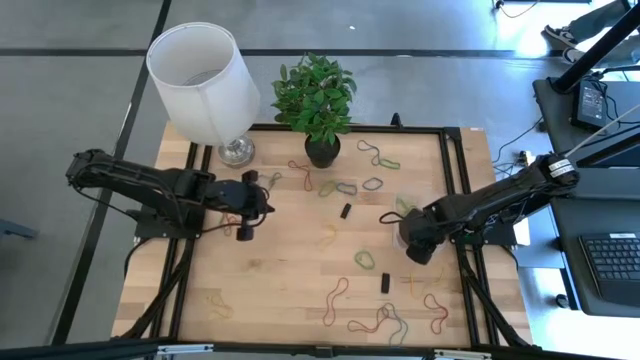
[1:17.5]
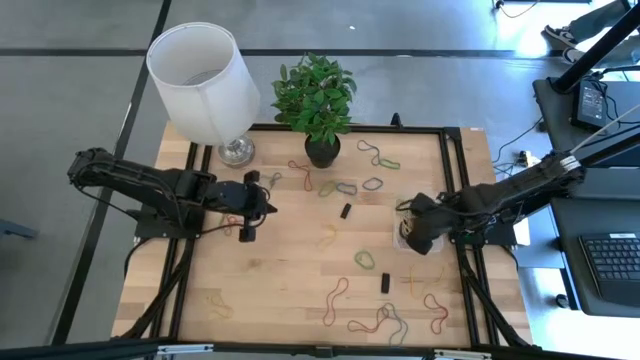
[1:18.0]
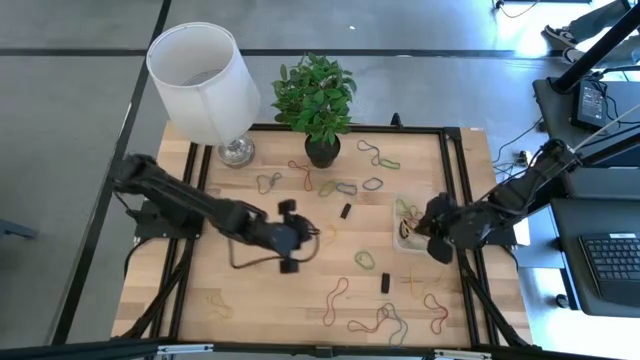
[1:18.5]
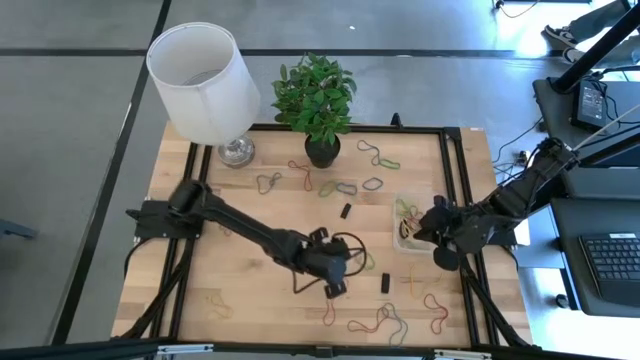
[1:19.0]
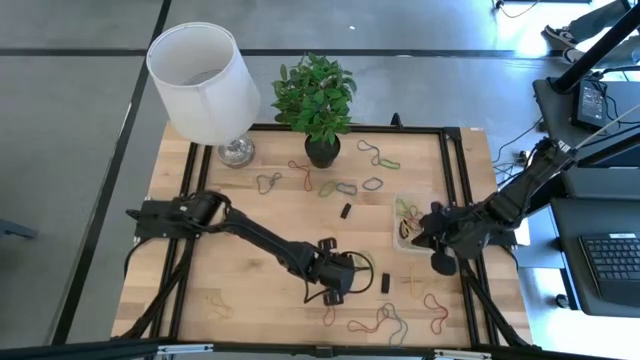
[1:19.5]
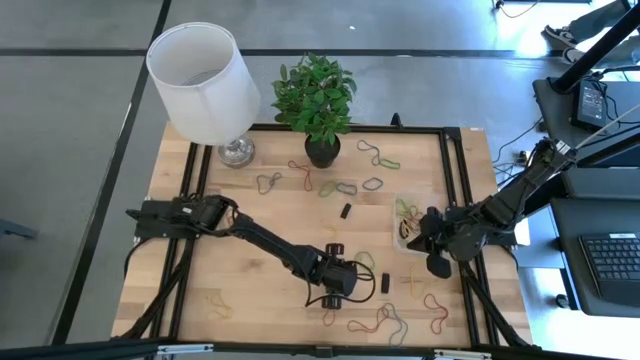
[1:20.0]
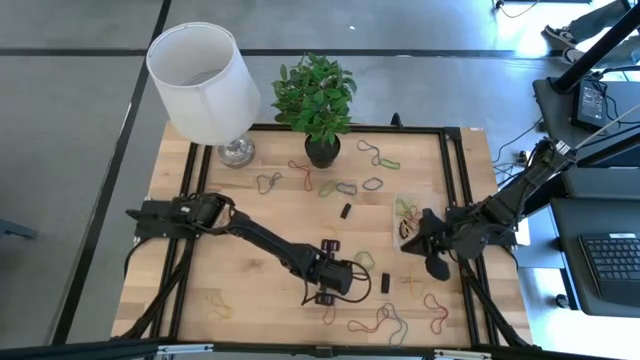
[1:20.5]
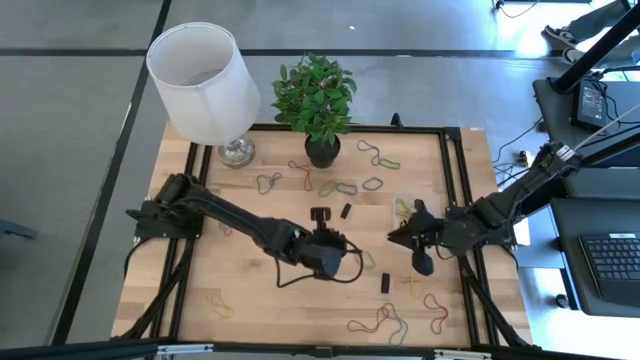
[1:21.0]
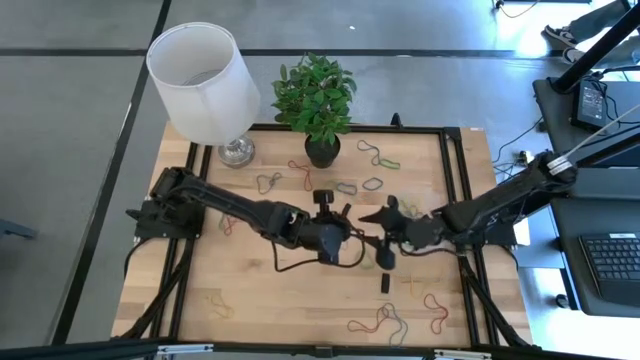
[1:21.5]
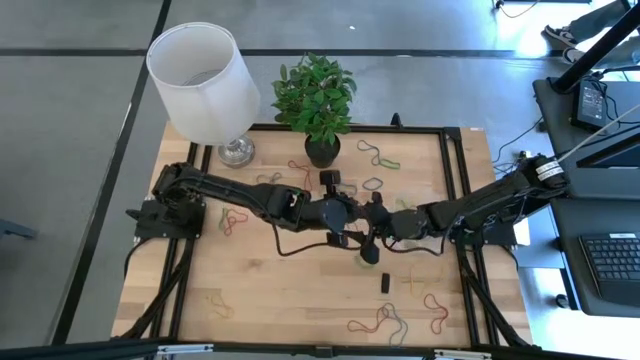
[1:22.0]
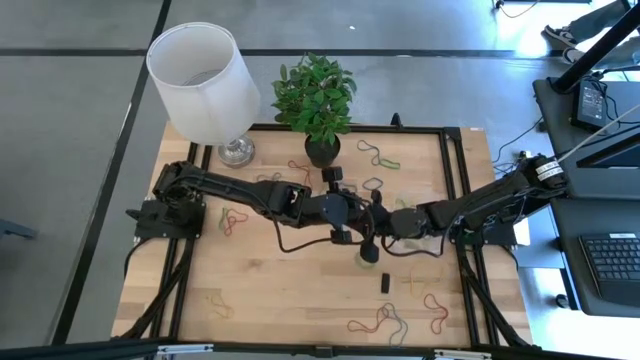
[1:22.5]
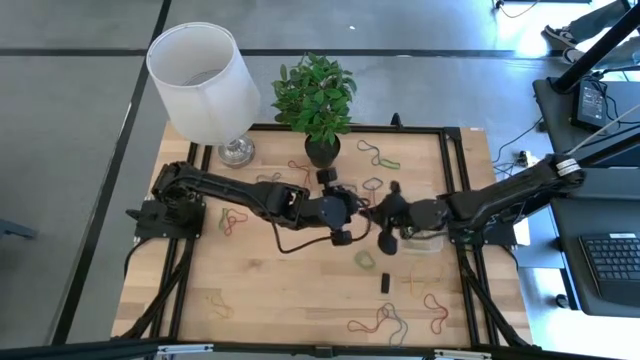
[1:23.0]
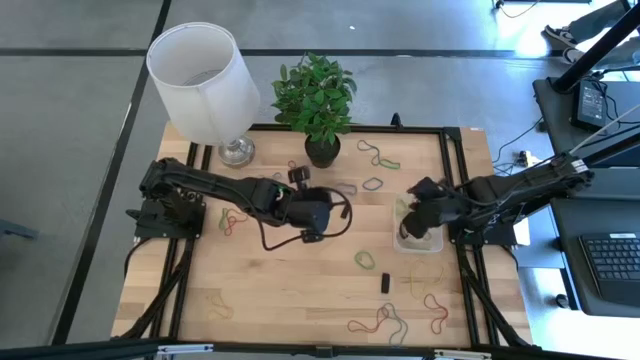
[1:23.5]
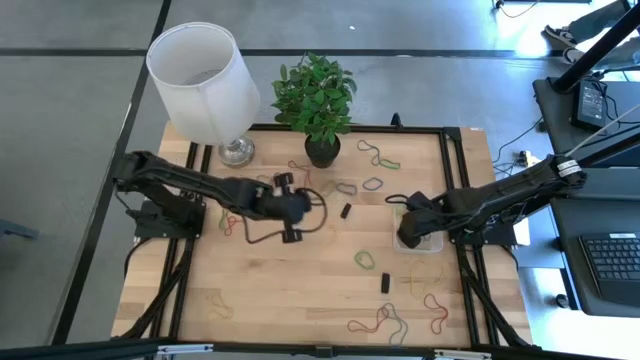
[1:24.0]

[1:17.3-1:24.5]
Task: Pick and place rubber bands into bin
Put the red rubber band into the transparent bin

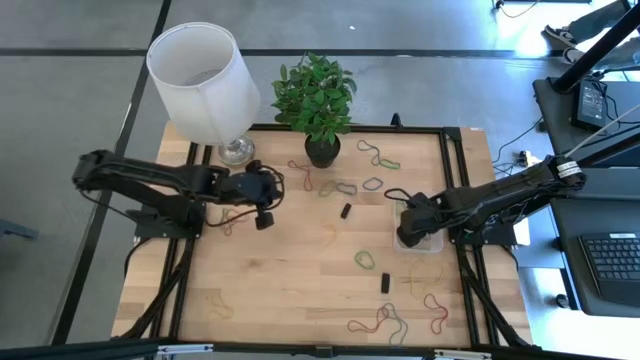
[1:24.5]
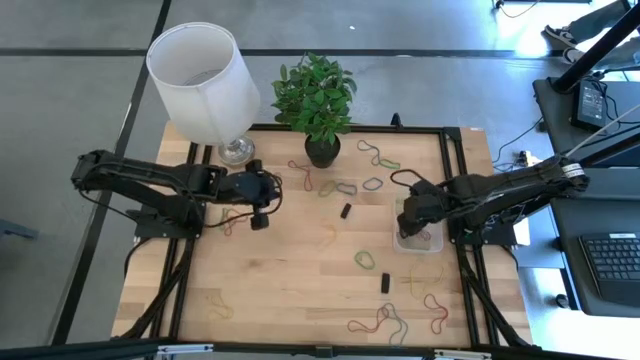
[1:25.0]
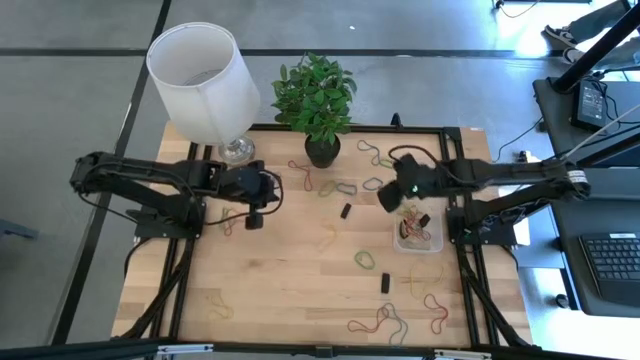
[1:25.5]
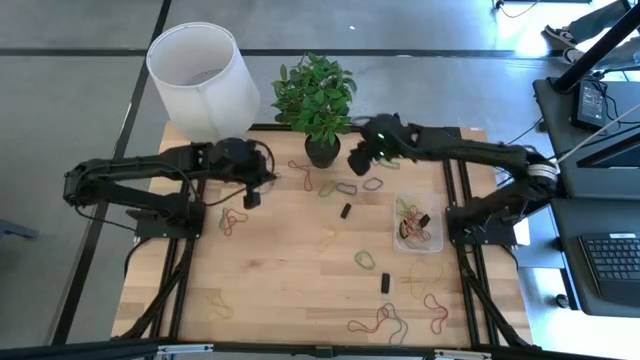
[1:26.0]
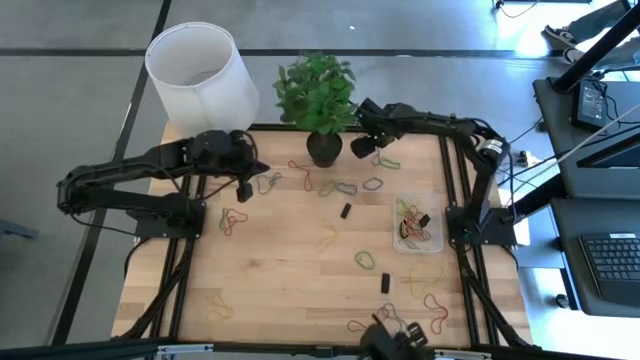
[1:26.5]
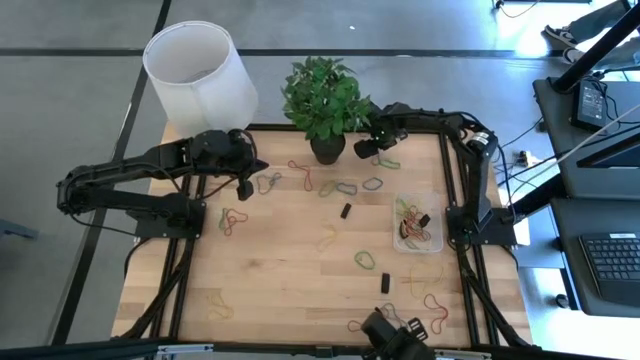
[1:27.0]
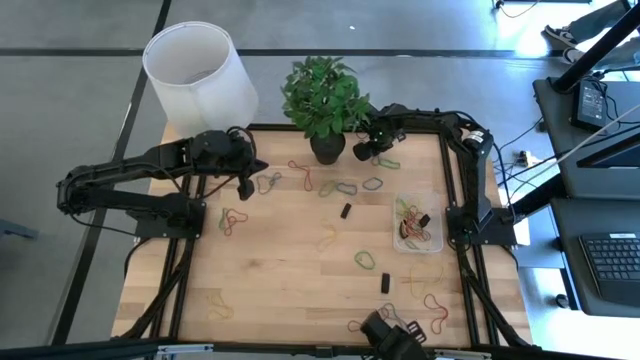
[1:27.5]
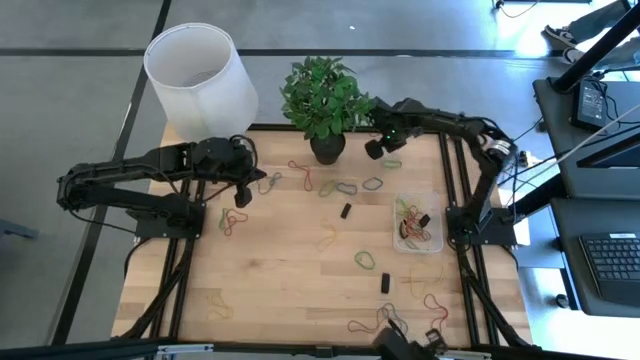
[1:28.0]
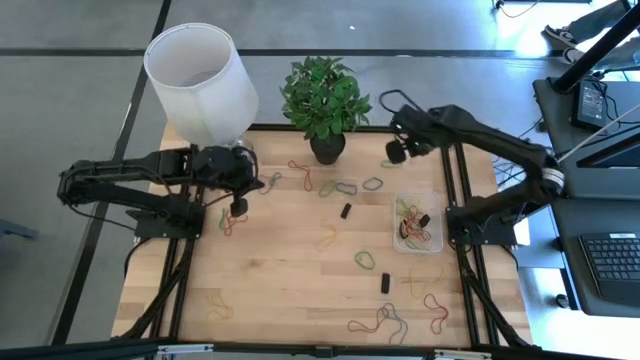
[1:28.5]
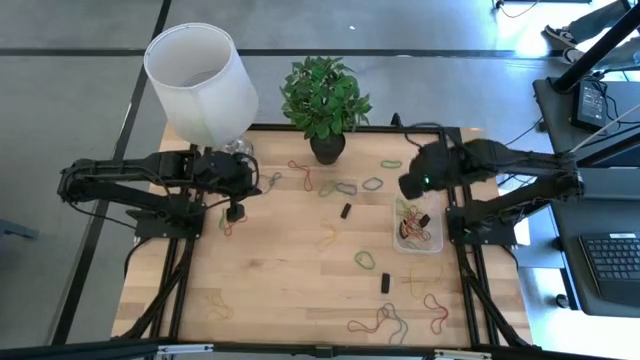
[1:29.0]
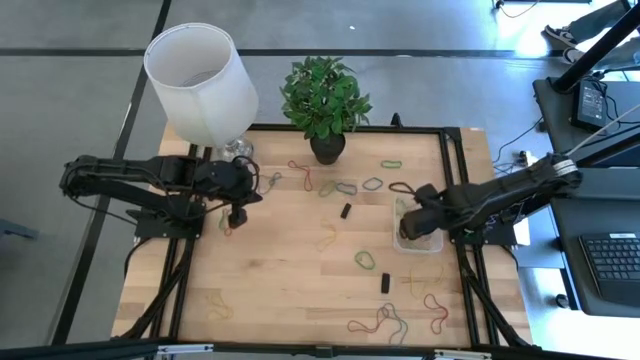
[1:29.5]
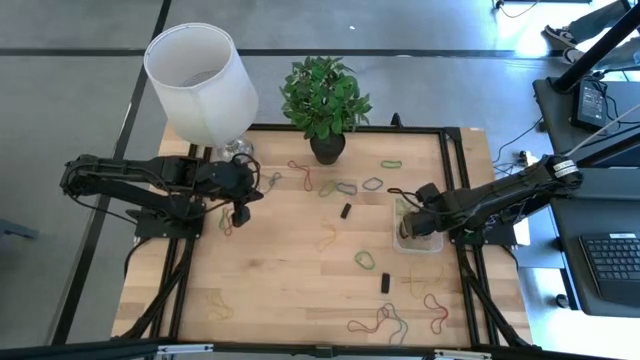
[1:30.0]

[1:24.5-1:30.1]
Put the blue rubber band into the transparent bin

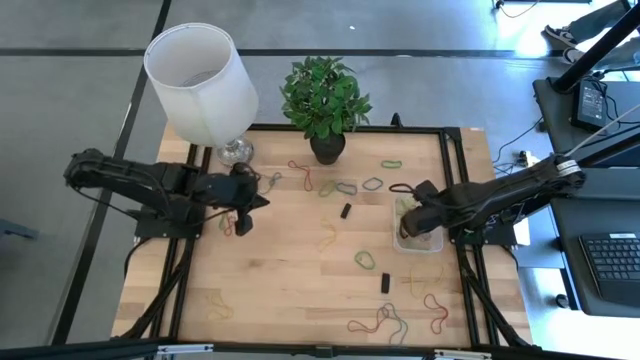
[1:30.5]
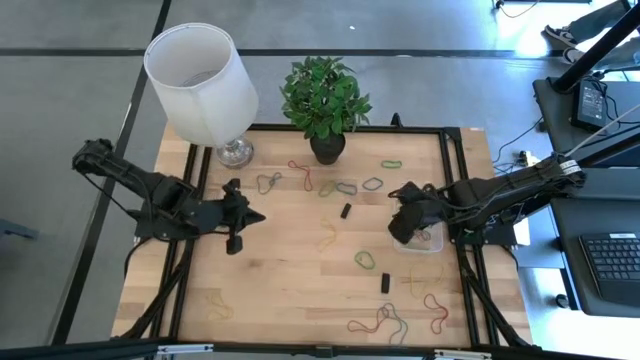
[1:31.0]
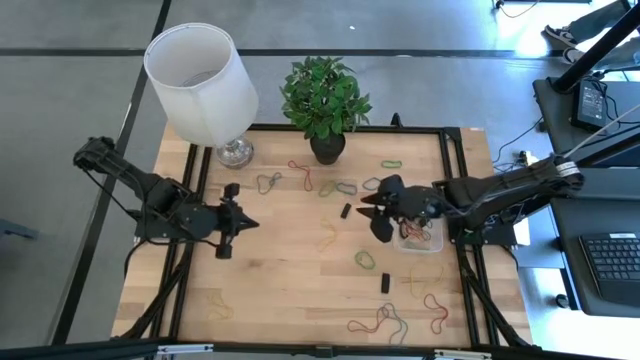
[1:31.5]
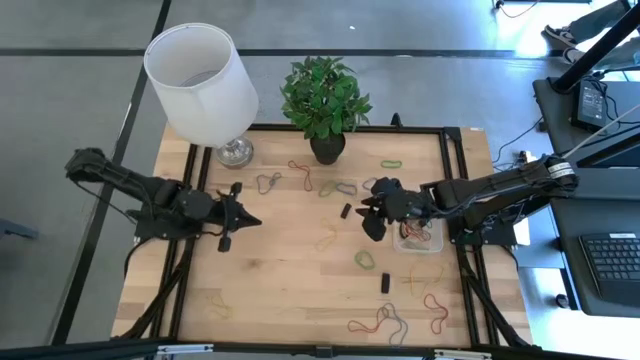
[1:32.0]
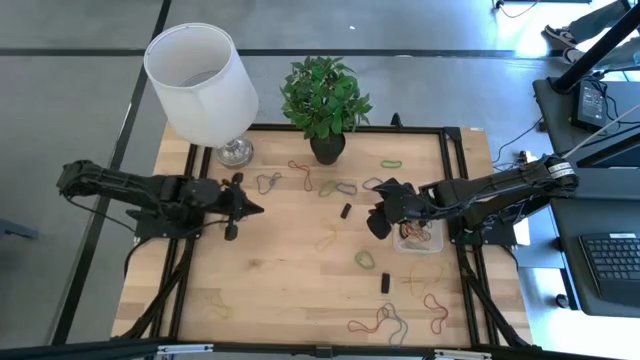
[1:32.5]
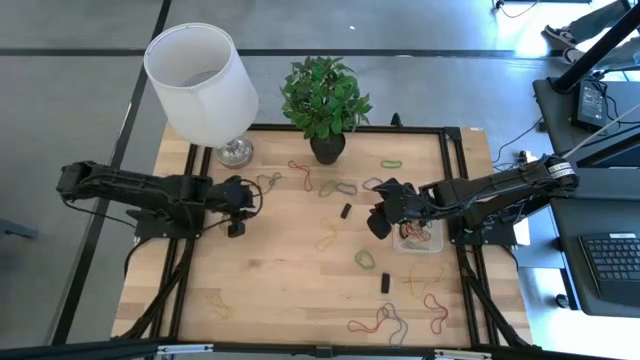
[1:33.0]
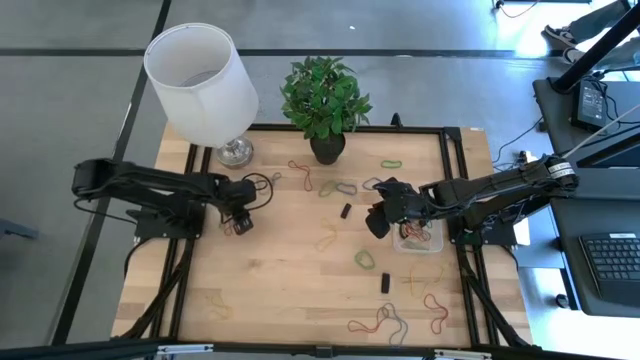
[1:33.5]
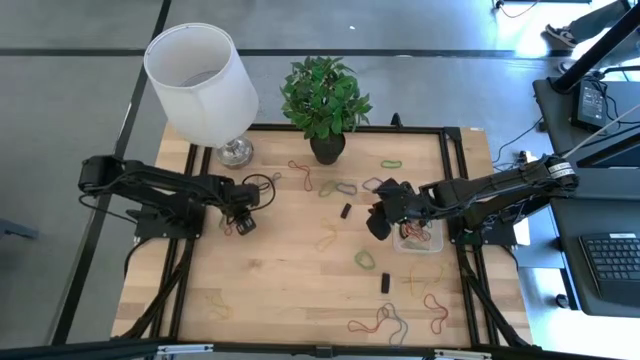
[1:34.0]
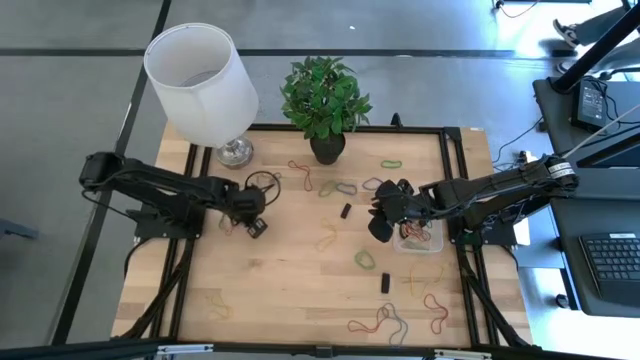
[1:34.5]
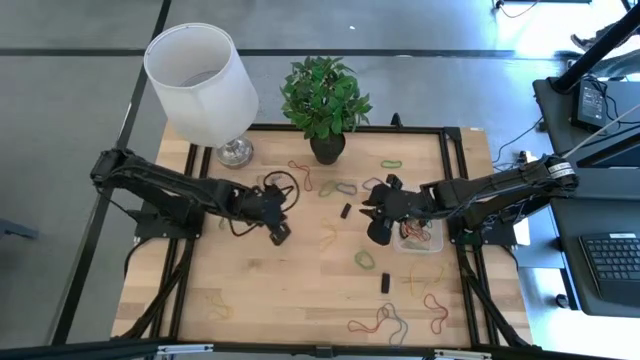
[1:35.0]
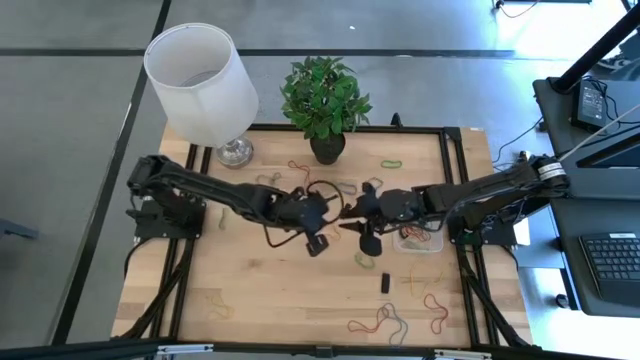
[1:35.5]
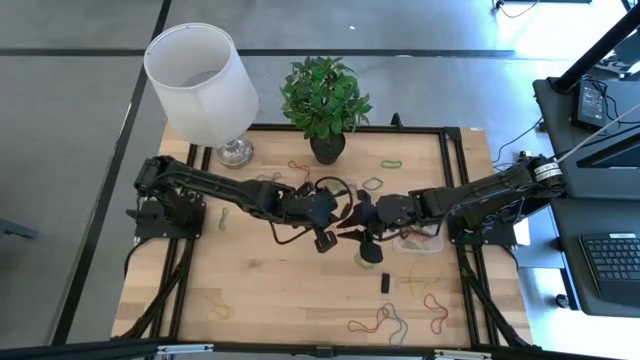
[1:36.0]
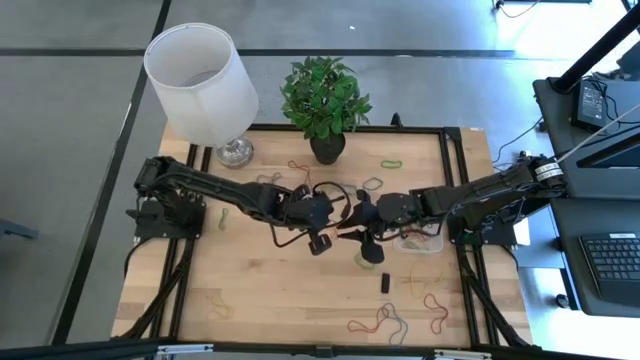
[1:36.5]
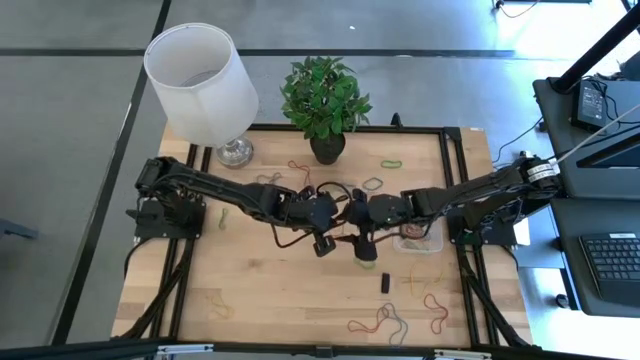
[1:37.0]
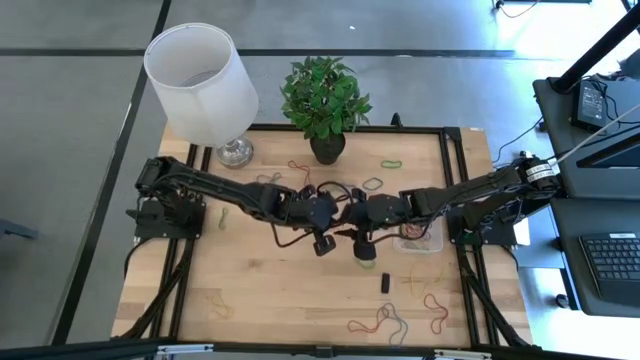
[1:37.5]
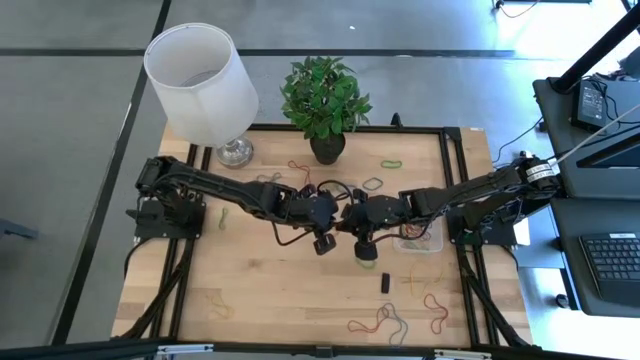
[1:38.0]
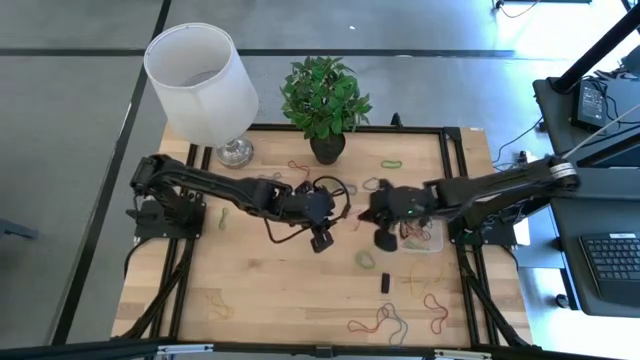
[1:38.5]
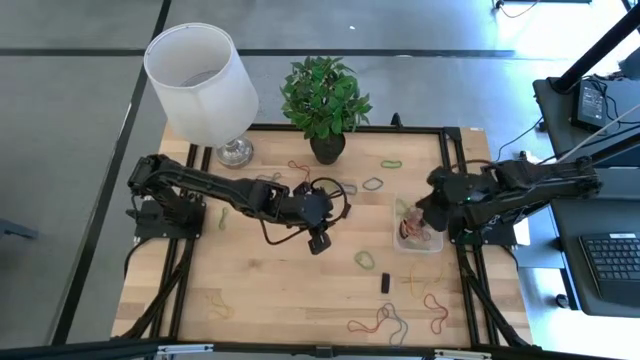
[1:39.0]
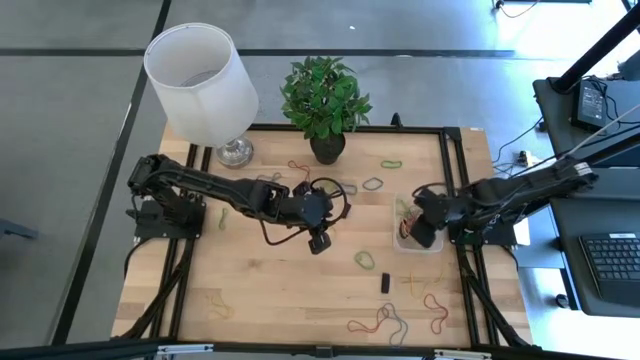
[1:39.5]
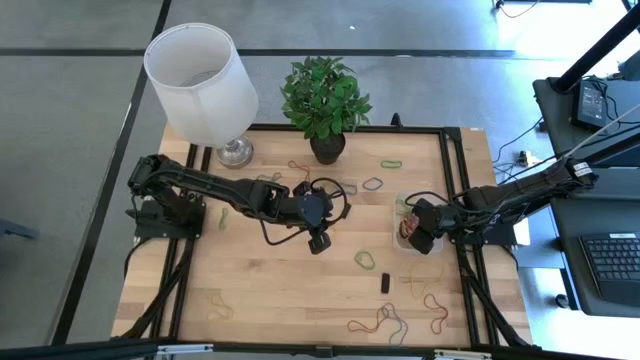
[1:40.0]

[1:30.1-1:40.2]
Put the red rubber band into the transparent bin
